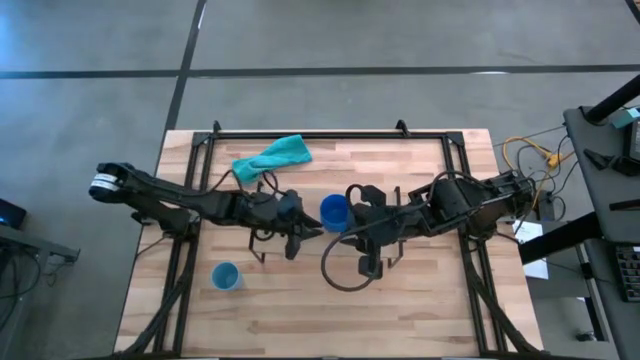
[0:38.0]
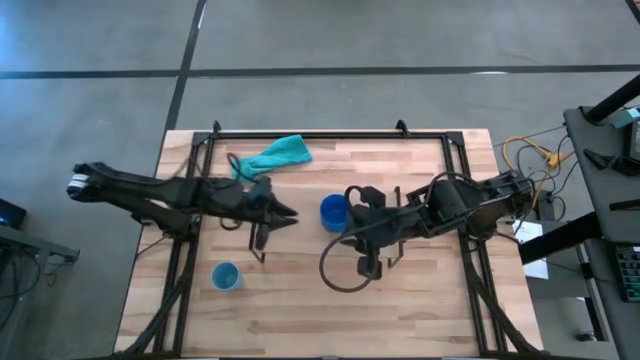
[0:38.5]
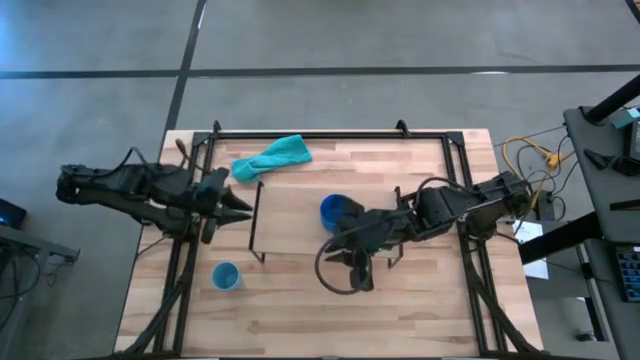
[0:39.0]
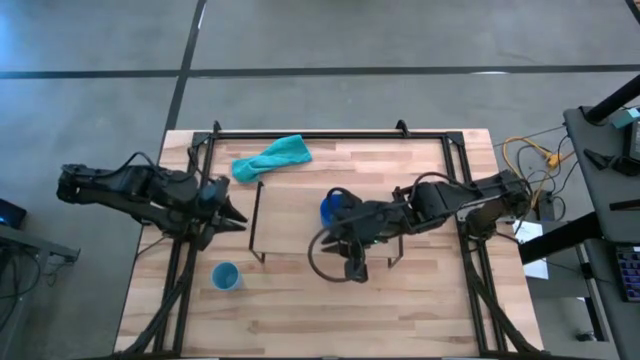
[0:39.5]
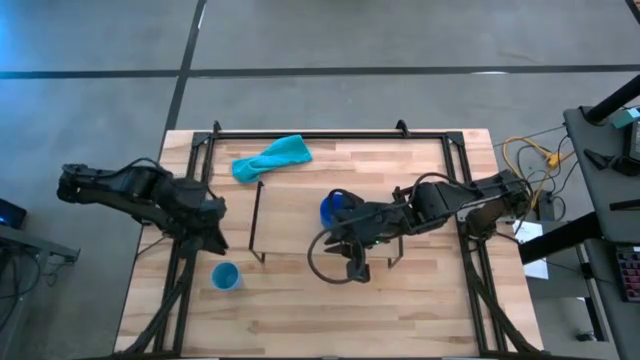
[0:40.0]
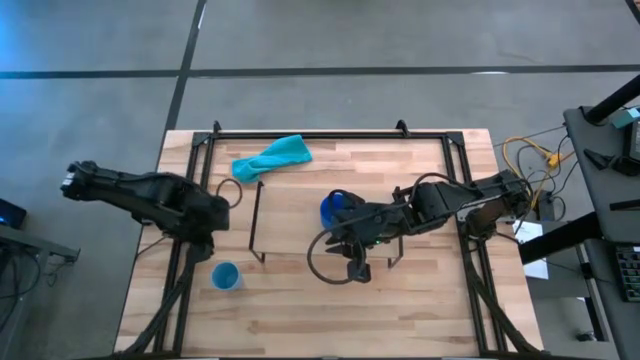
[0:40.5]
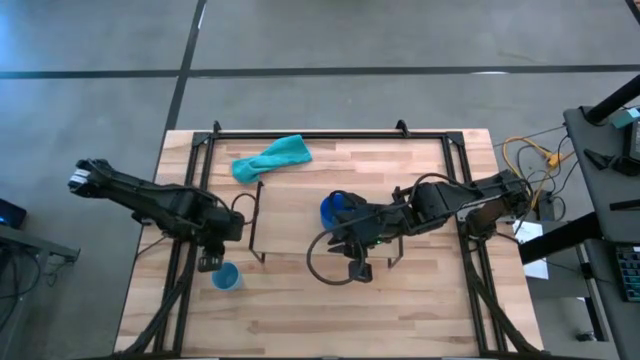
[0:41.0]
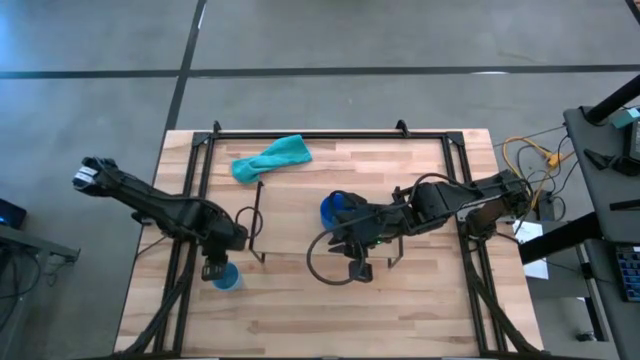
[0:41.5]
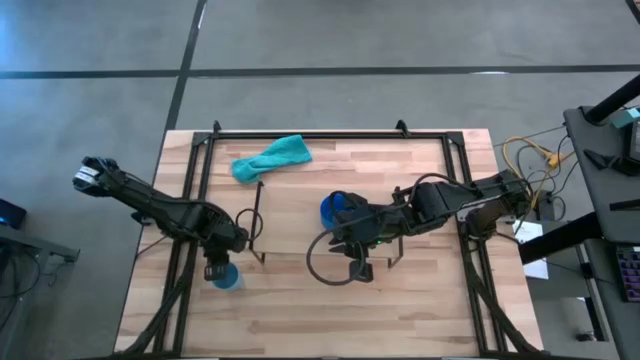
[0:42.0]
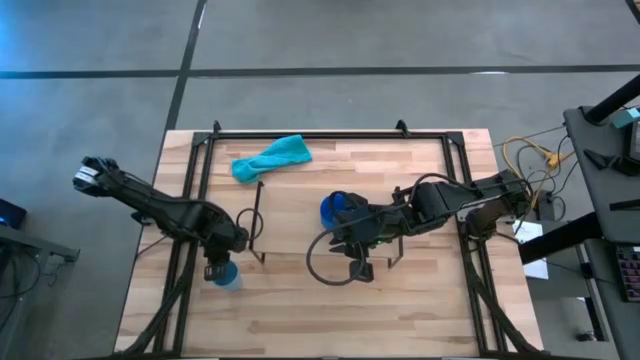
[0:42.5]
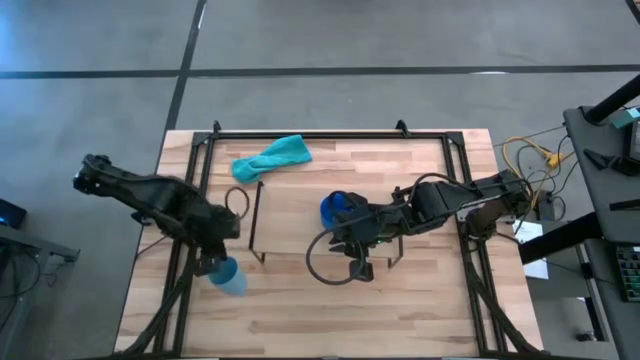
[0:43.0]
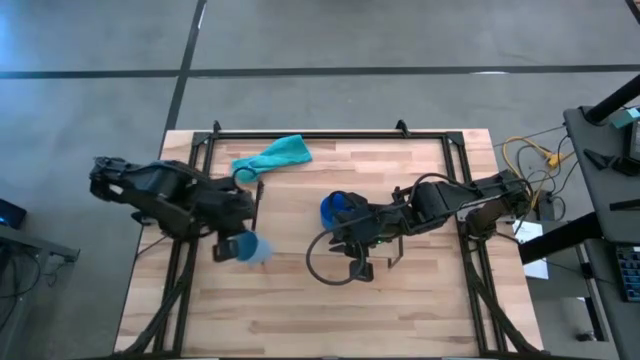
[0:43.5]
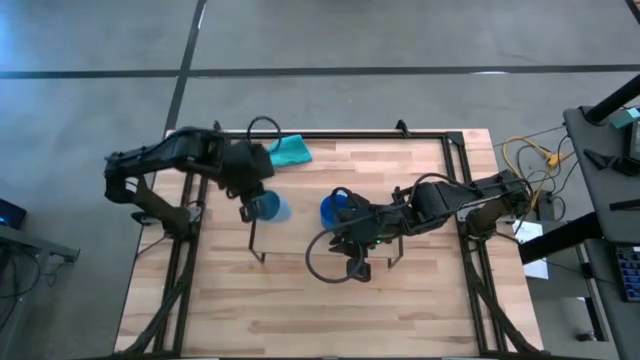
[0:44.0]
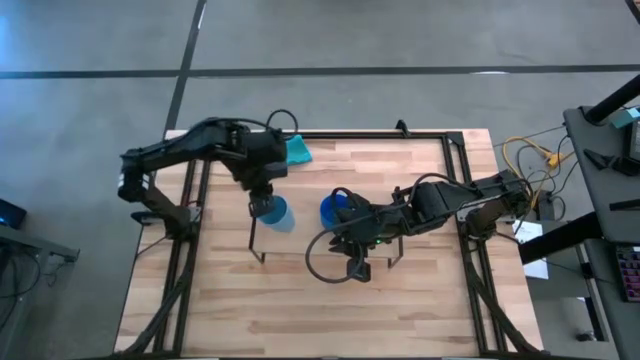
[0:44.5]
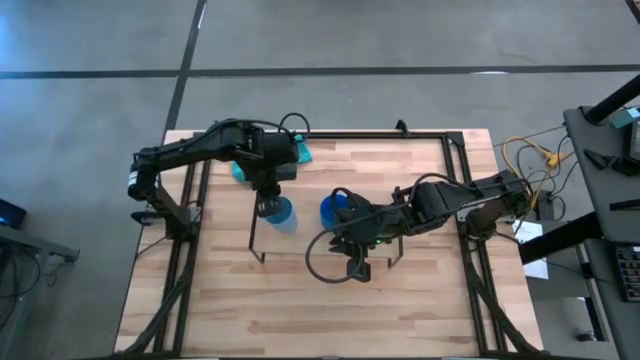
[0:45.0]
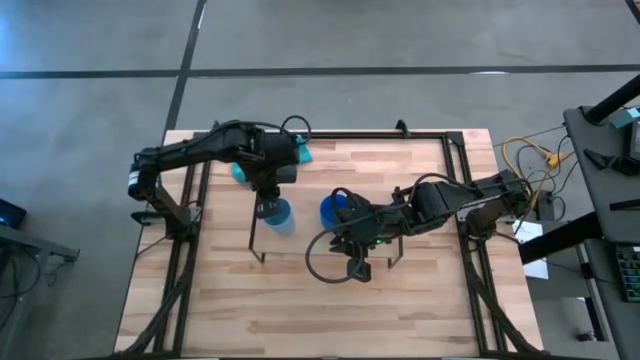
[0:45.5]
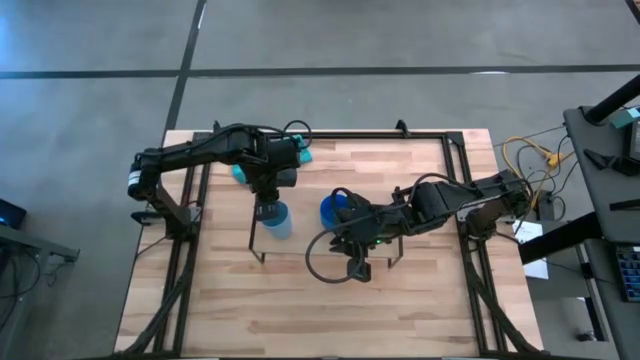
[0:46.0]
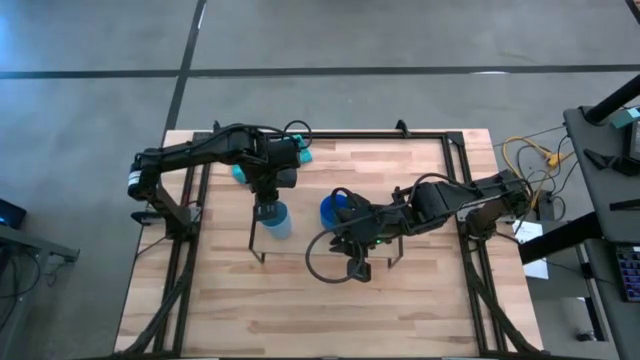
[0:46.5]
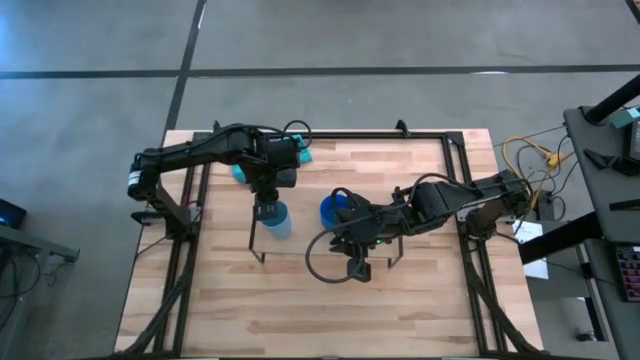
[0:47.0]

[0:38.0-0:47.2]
Task: Stack small to large cups/mugs on shelf
Put the light blue cup on the shelf

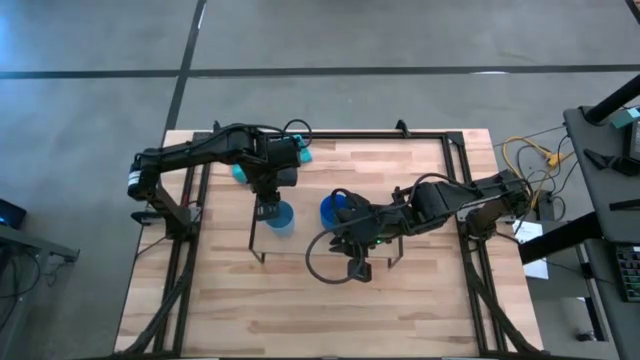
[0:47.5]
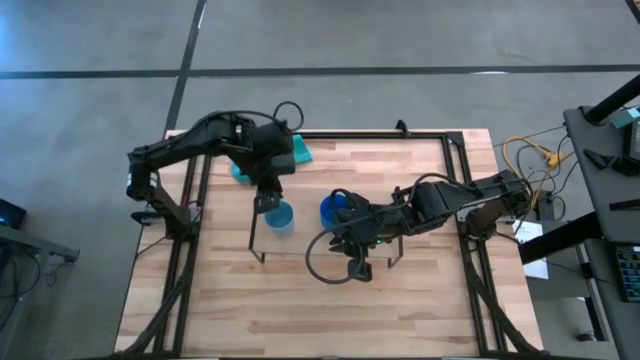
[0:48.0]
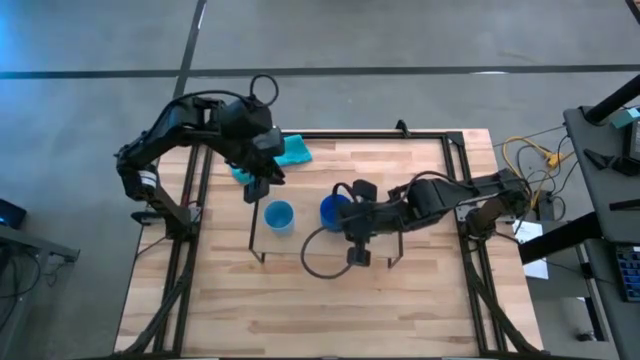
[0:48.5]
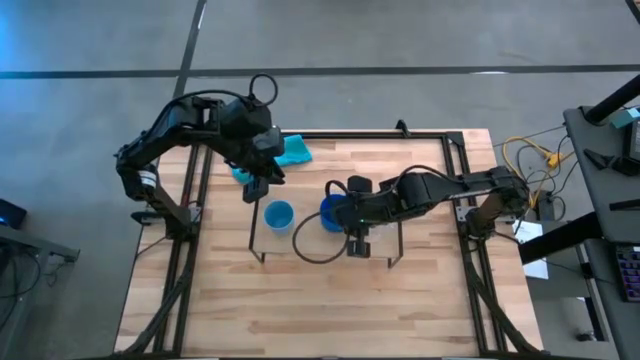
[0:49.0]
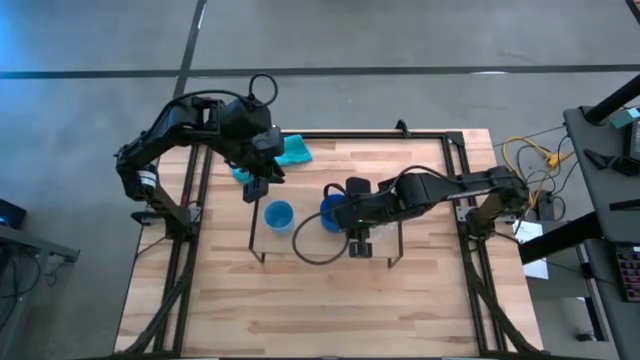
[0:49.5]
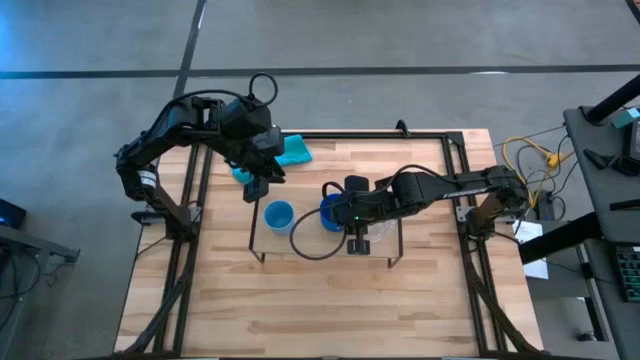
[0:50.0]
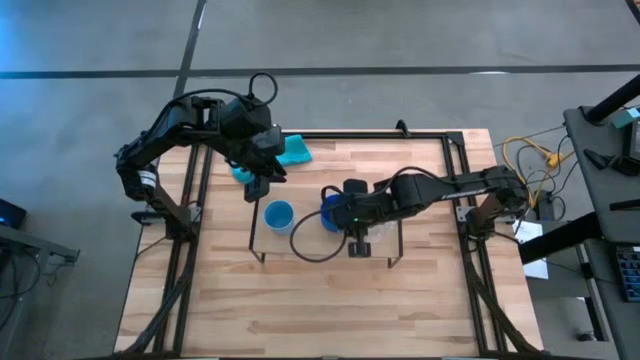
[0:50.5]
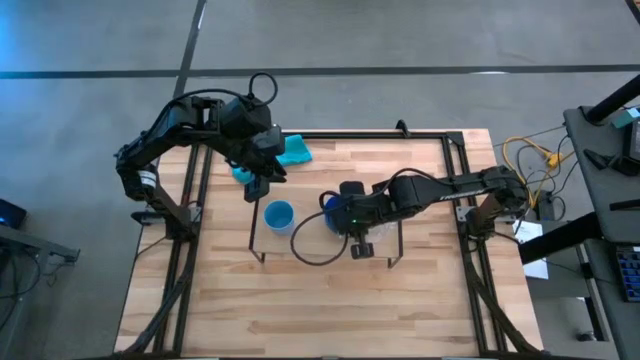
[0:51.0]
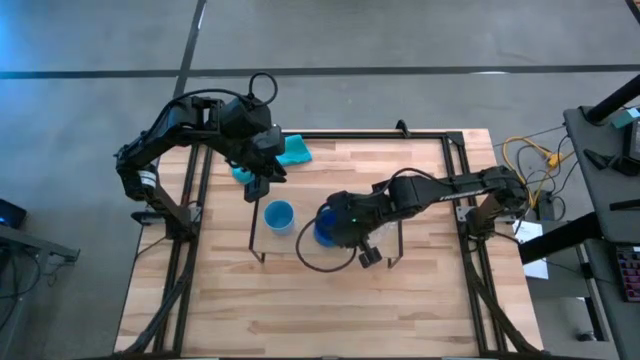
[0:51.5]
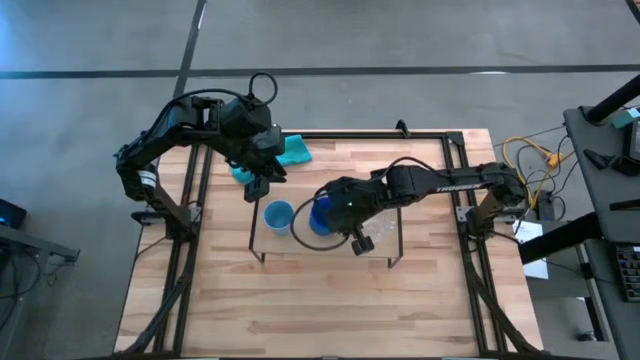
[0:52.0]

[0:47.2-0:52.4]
Adjust the blue cup on the shelf

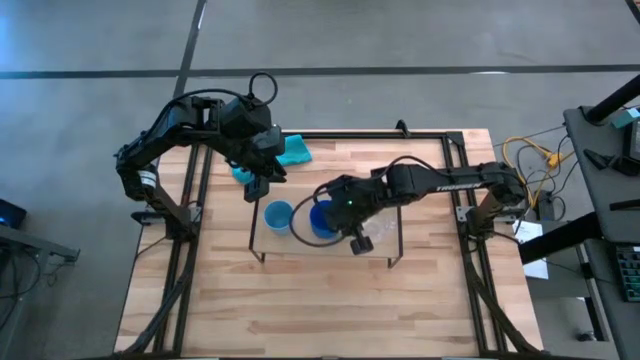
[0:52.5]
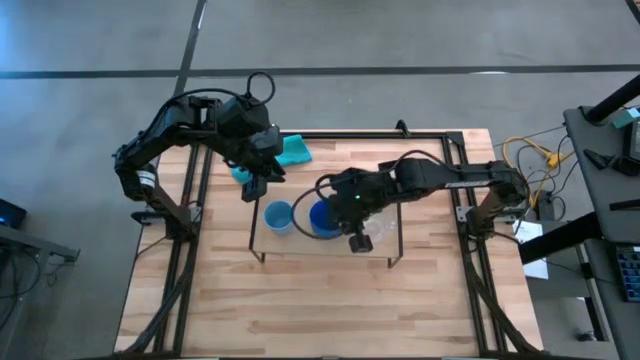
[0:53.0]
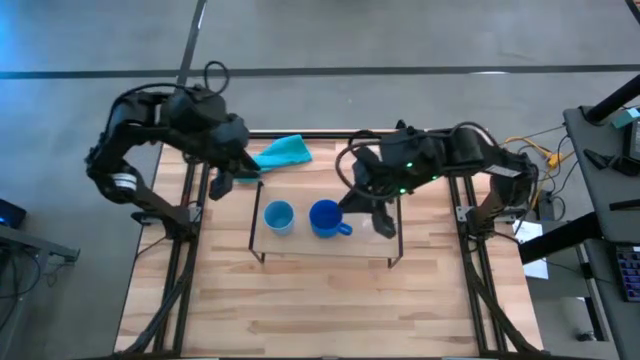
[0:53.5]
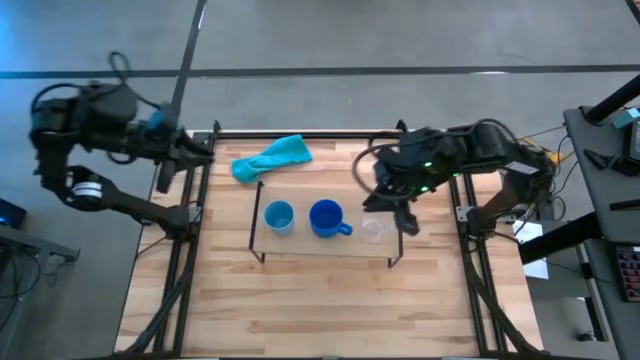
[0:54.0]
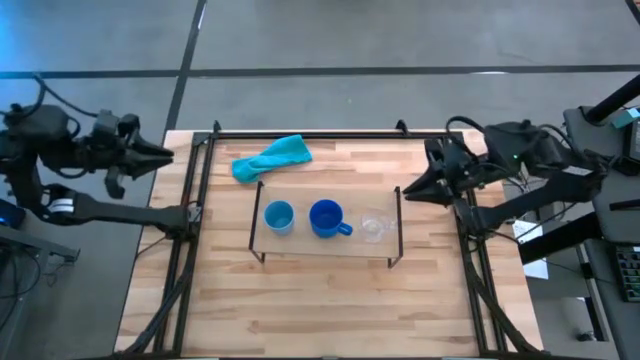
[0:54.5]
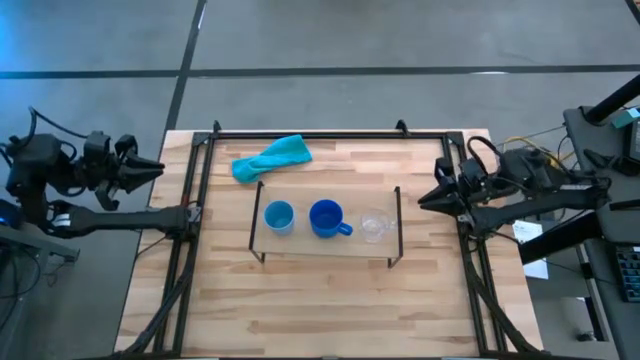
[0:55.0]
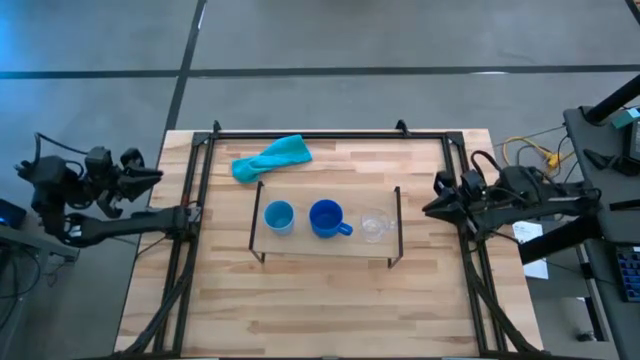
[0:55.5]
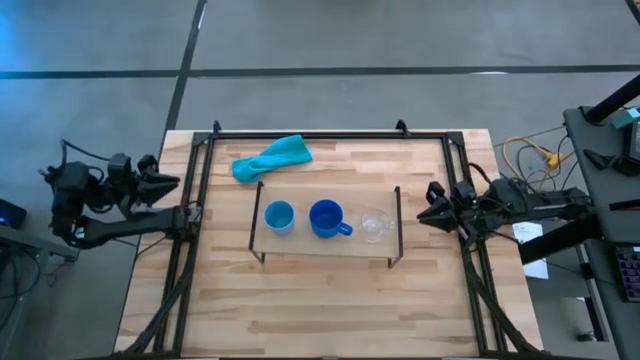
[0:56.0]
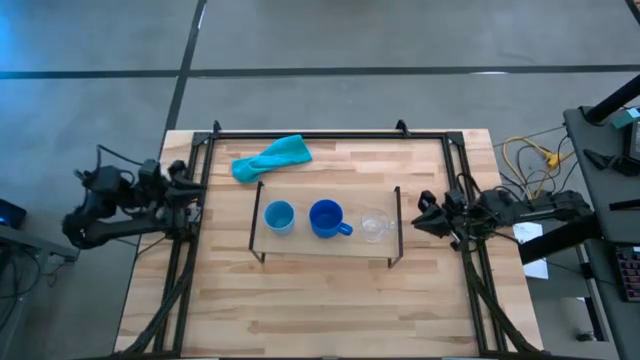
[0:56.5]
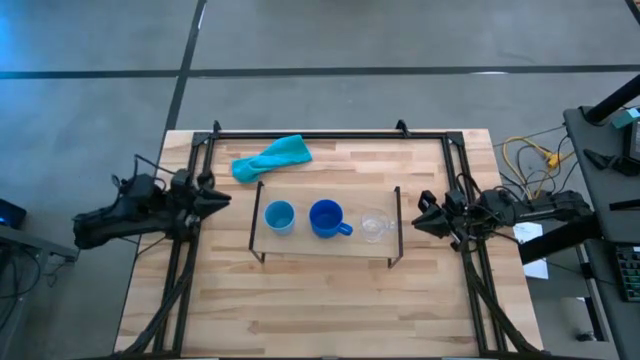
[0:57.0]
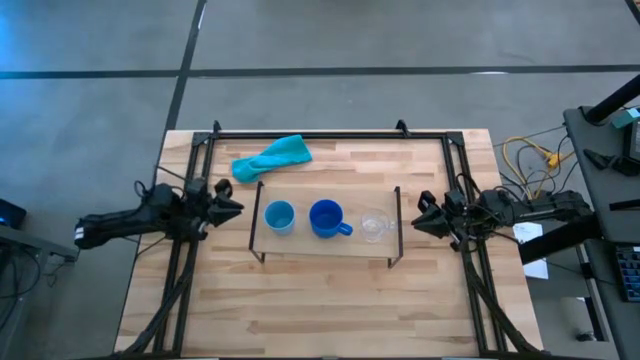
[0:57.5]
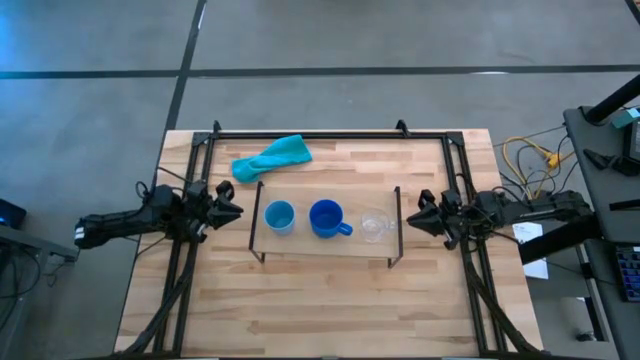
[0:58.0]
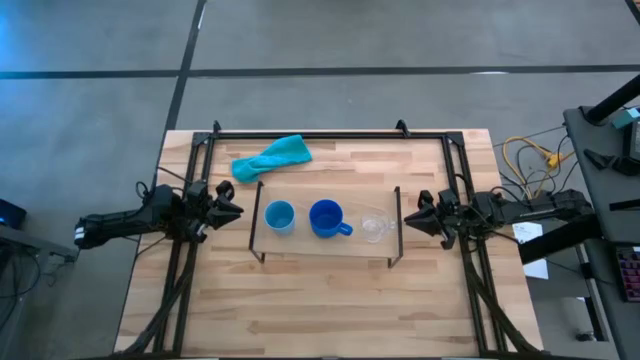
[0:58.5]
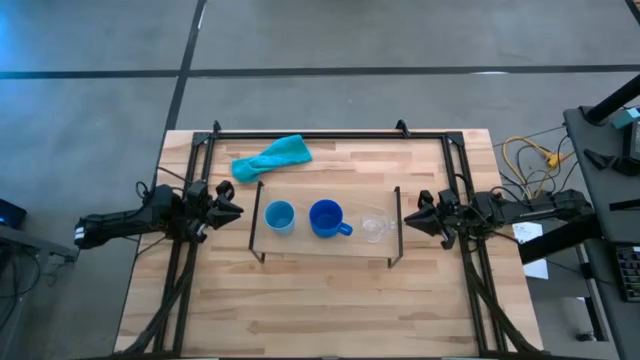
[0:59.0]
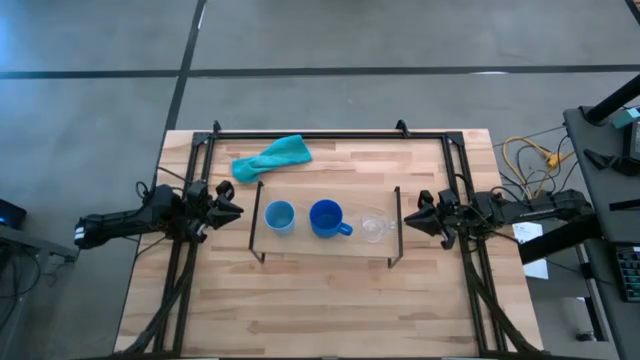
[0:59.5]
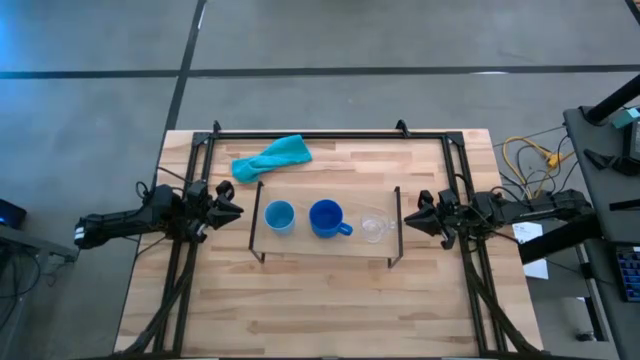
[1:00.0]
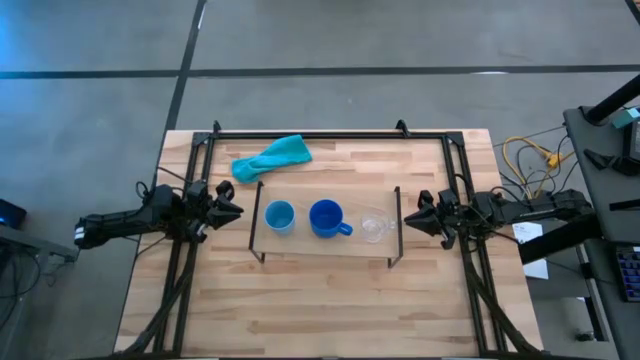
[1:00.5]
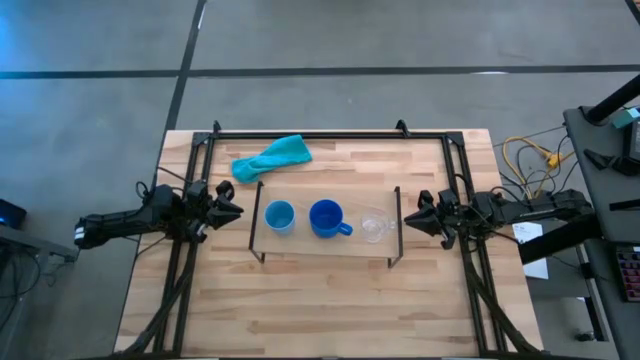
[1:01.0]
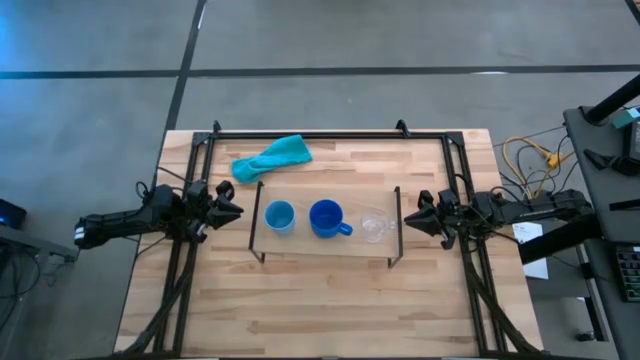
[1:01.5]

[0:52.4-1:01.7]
Return to Home Position
